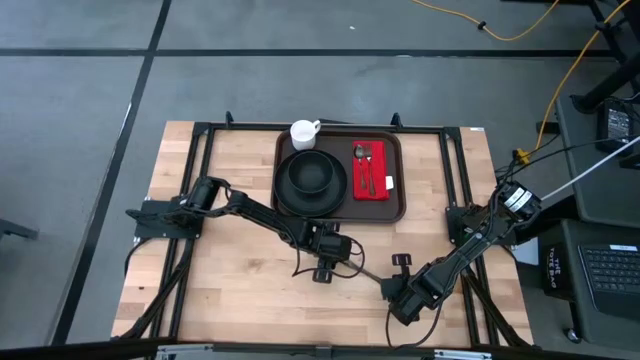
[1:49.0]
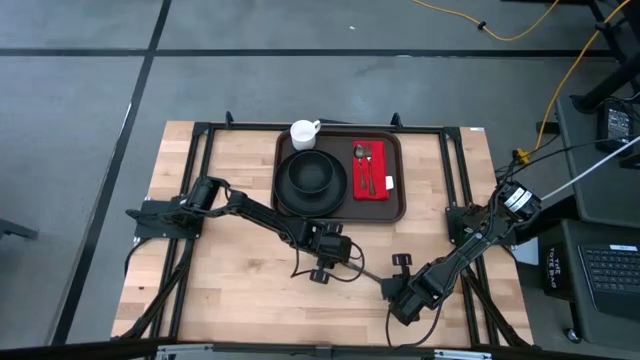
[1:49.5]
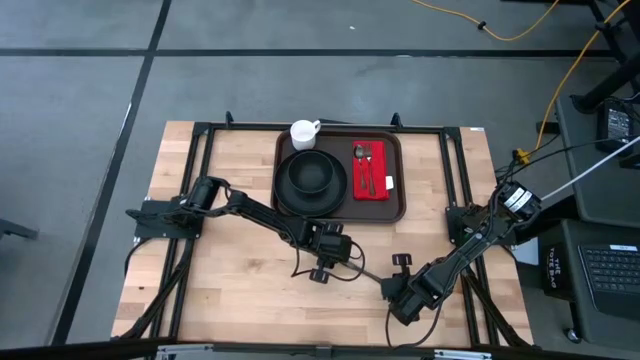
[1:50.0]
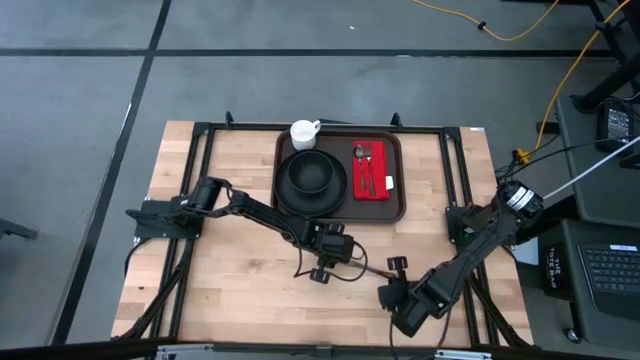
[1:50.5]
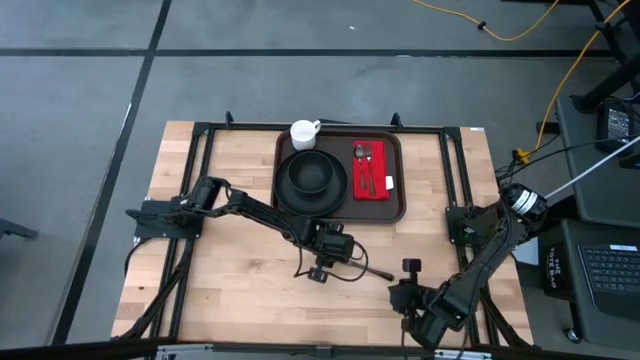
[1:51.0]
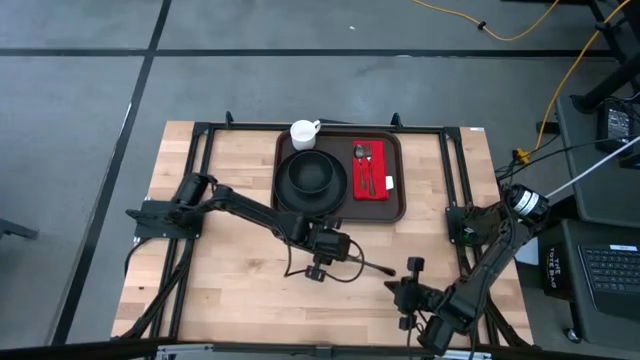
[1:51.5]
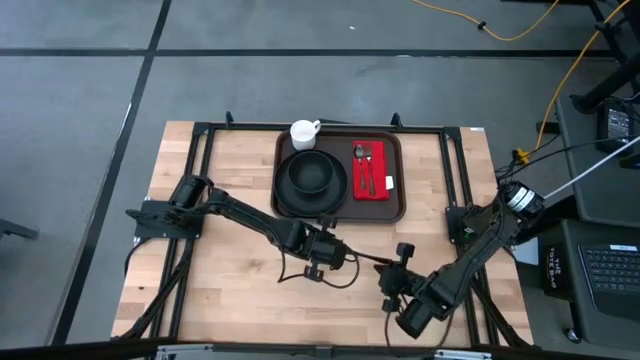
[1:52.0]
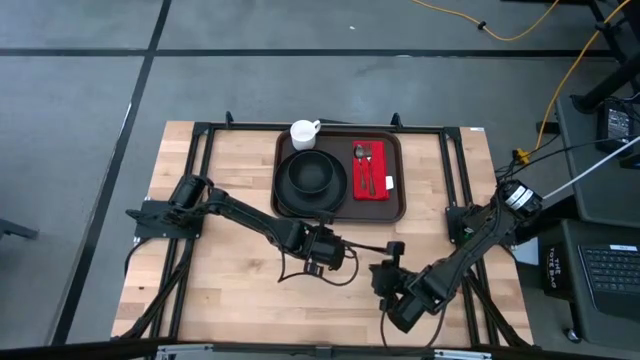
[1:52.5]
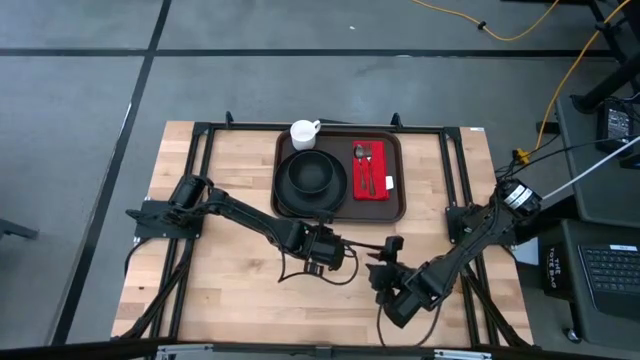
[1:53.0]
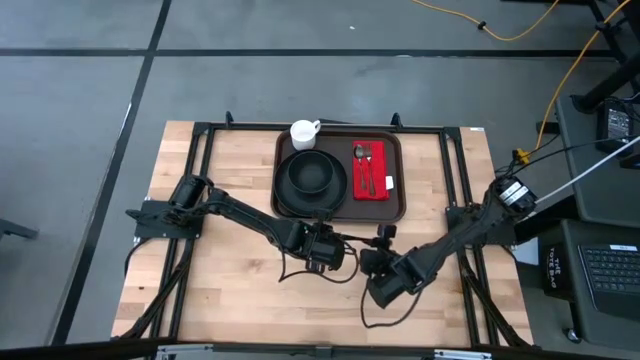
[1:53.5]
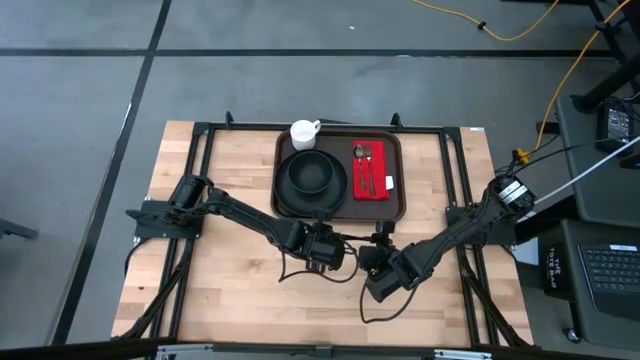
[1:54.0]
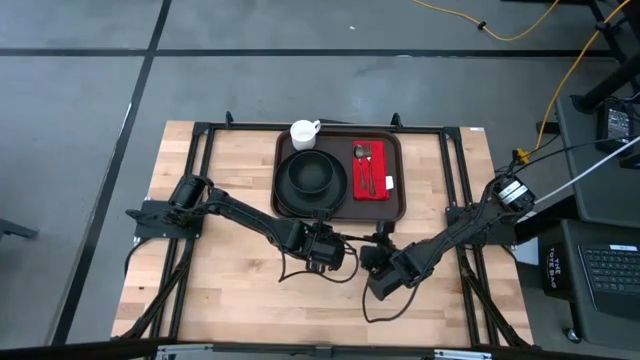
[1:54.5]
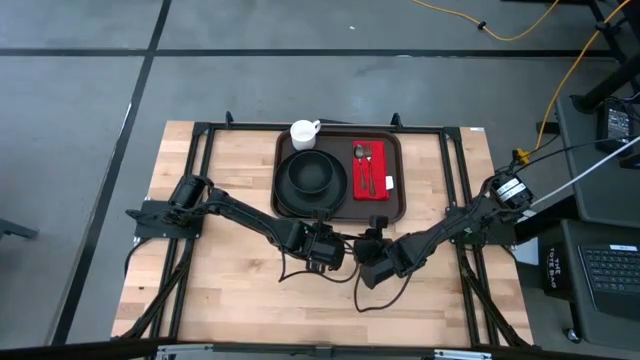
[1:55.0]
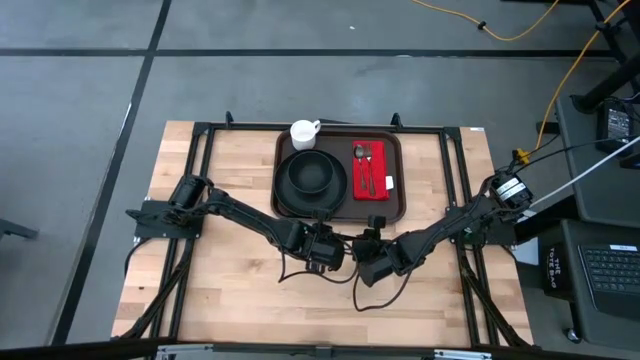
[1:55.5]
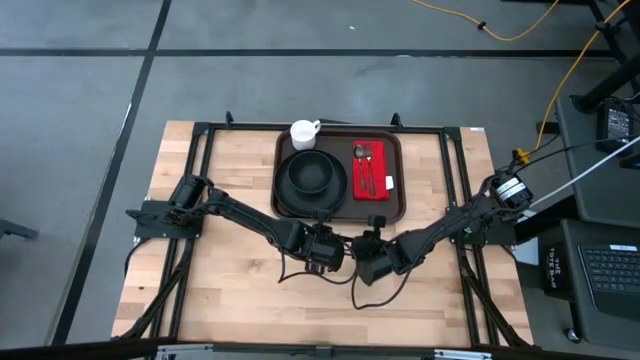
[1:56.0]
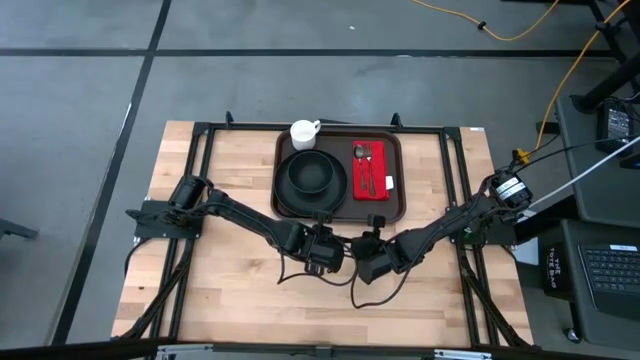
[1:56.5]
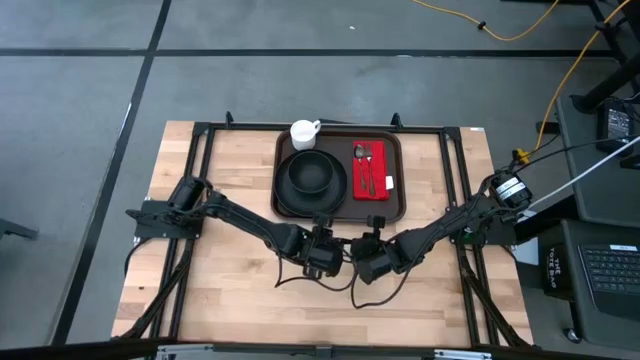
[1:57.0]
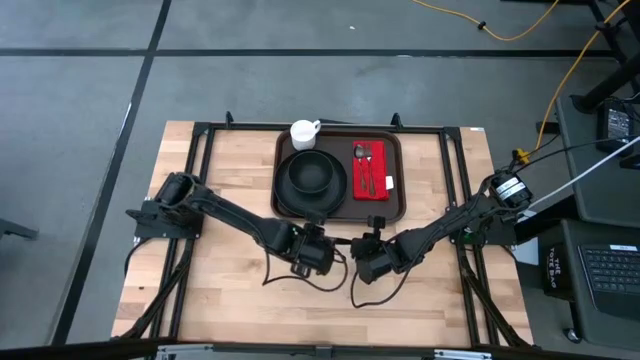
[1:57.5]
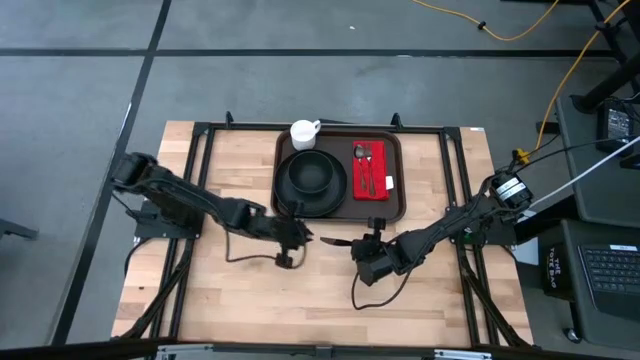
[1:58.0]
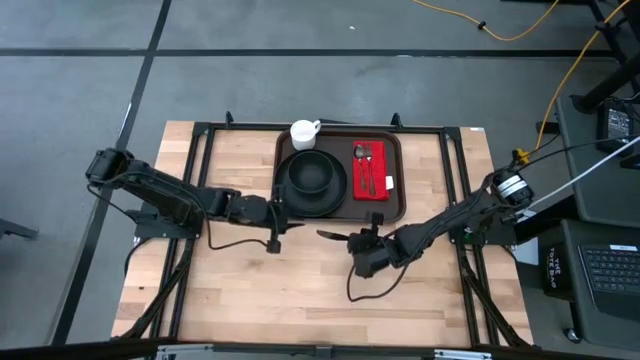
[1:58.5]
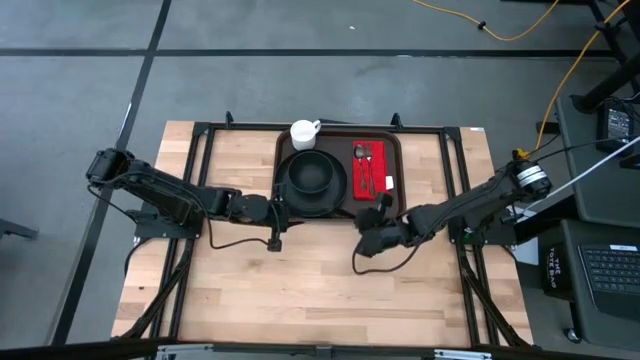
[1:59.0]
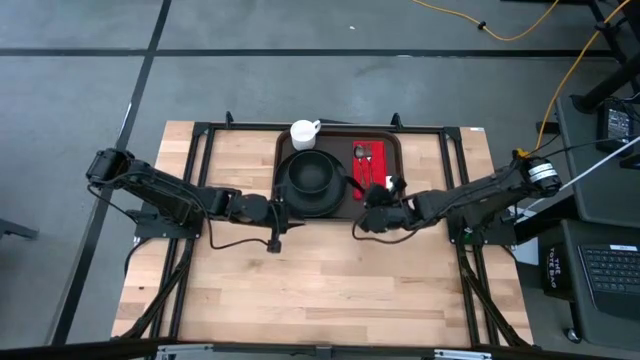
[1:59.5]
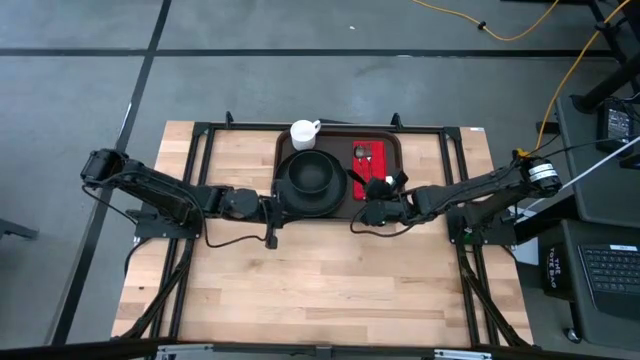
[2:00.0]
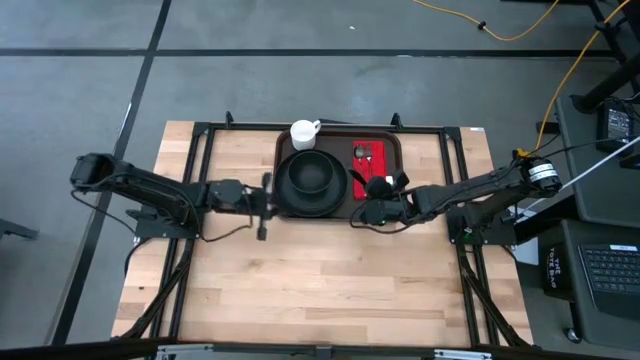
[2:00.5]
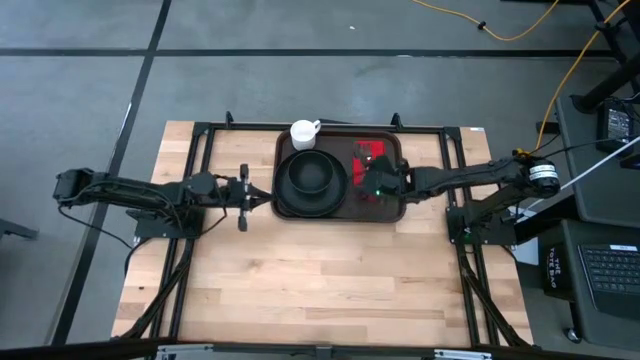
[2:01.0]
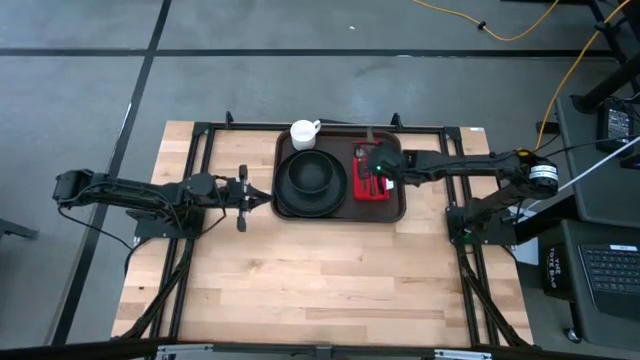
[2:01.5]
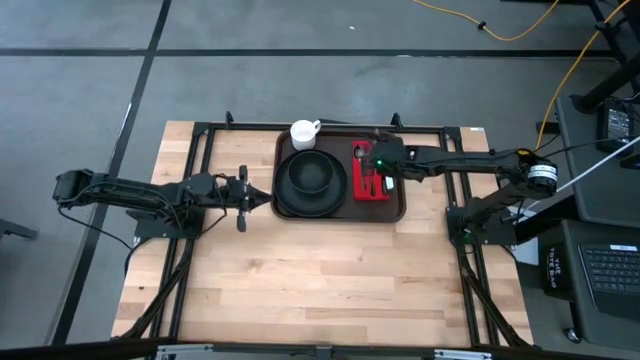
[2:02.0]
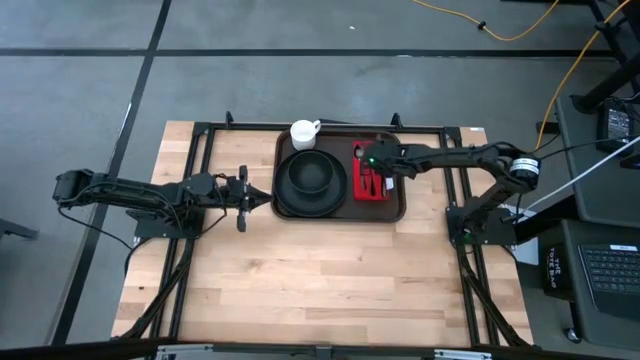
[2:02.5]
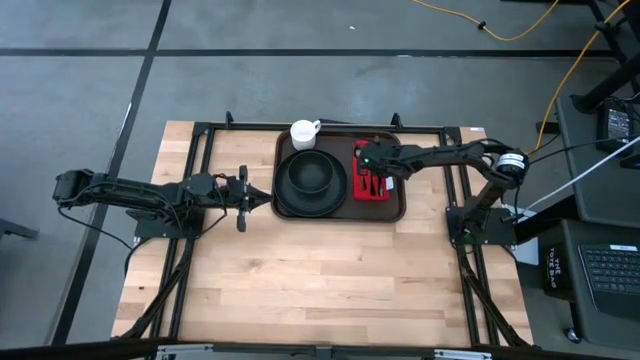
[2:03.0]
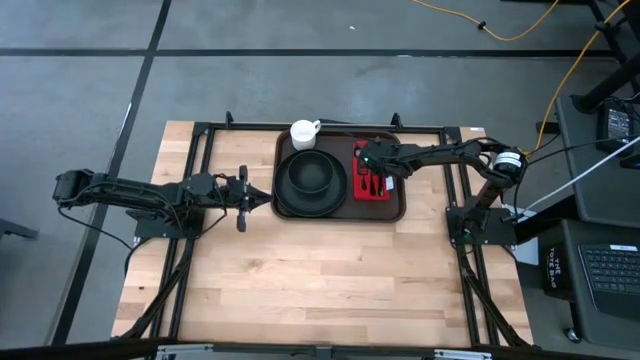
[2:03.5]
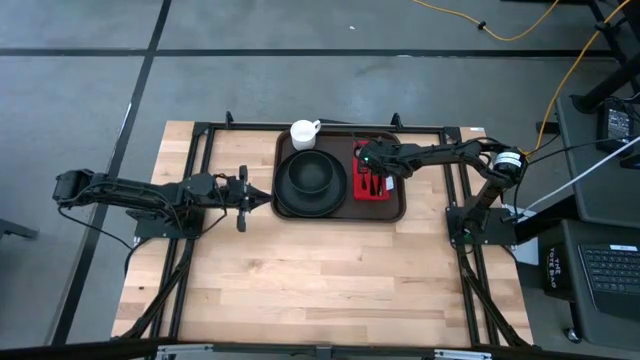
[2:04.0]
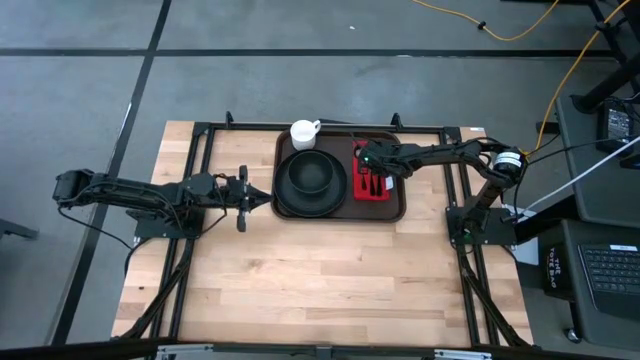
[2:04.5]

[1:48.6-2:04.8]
Task: Set up tray
Put the black knife on the red napkin to the right of the black fork

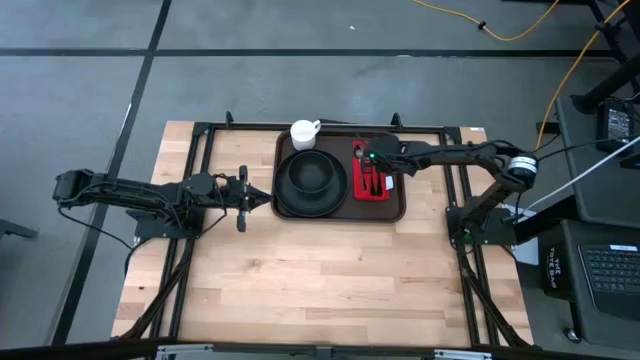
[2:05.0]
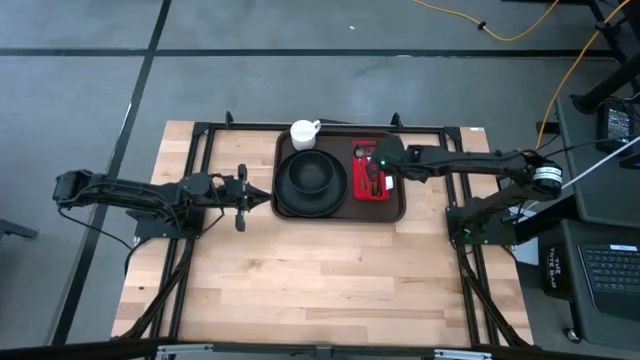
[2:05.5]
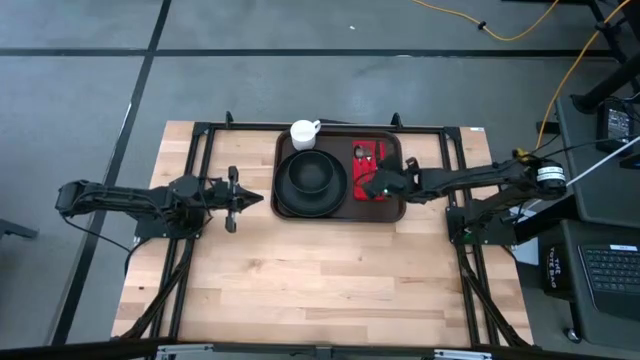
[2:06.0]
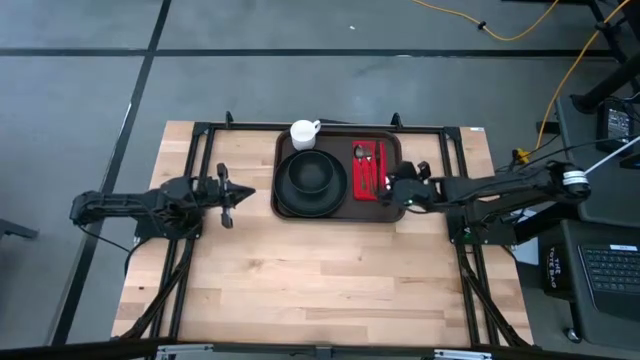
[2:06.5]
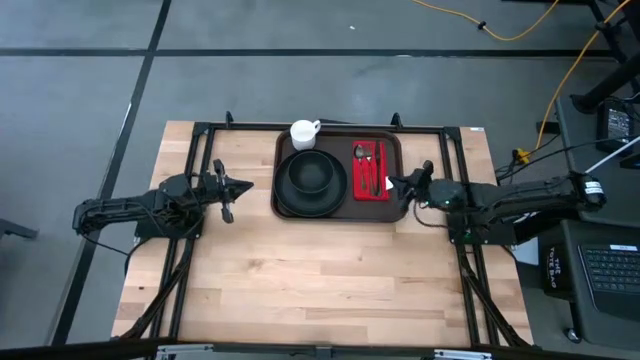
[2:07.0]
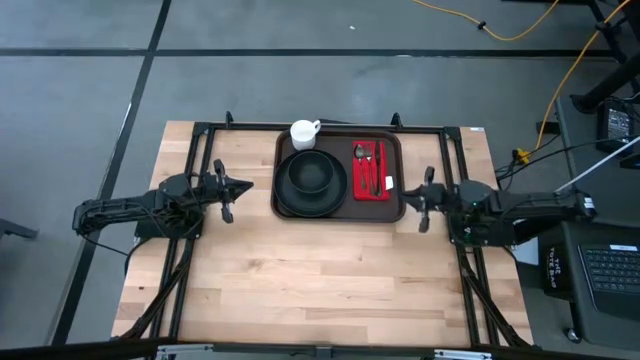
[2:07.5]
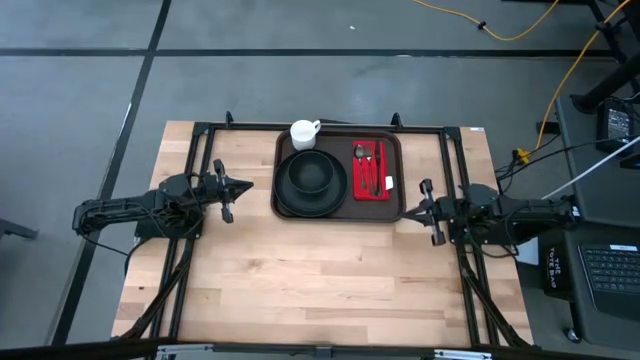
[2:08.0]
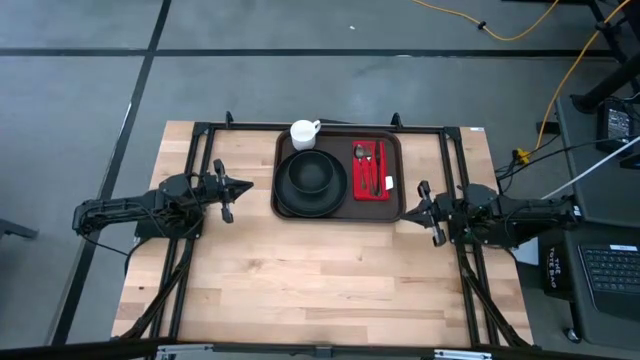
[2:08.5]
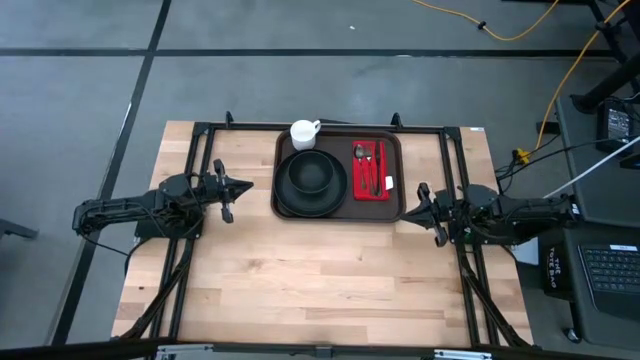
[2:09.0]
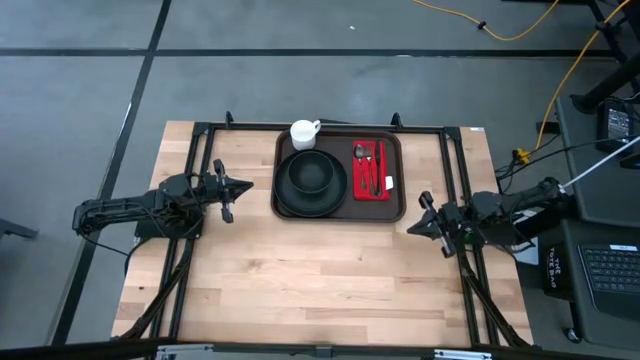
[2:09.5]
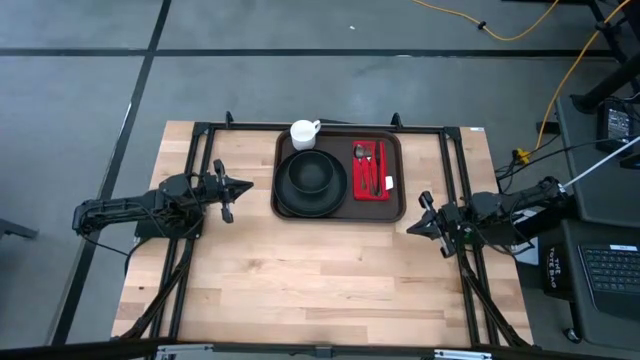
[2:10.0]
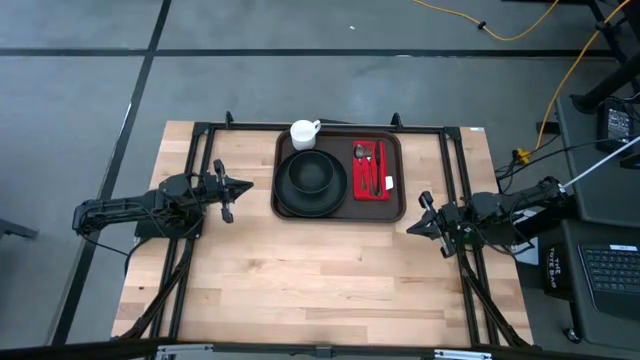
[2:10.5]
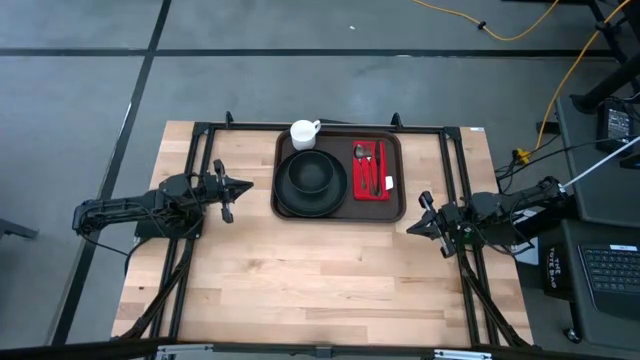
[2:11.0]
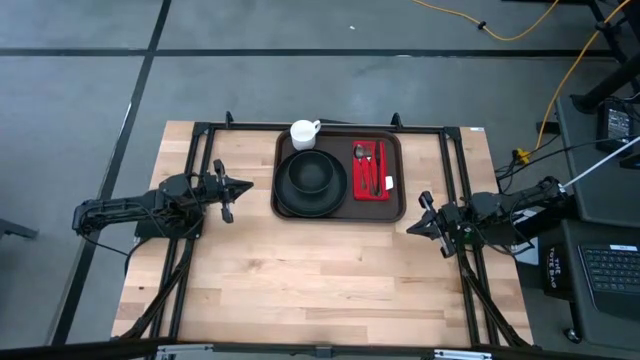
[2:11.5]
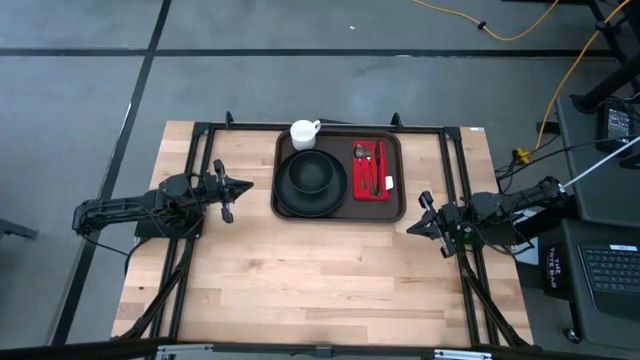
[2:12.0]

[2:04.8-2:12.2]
Return to Home Position
